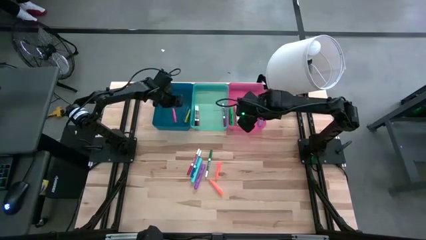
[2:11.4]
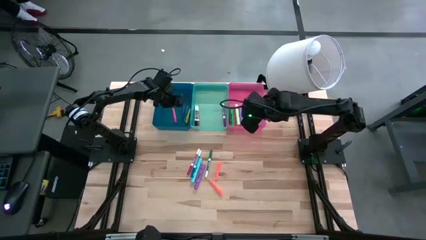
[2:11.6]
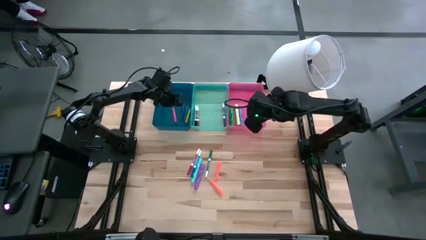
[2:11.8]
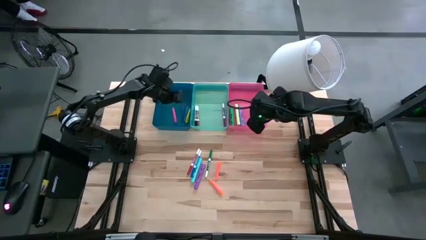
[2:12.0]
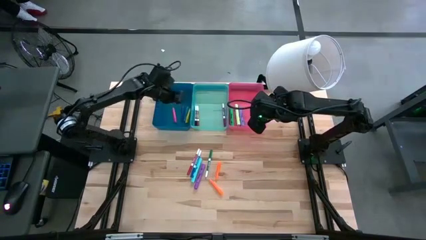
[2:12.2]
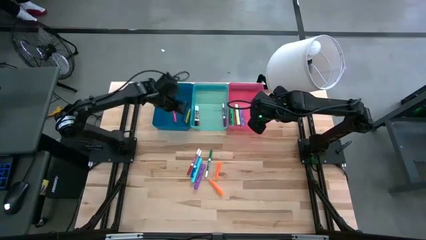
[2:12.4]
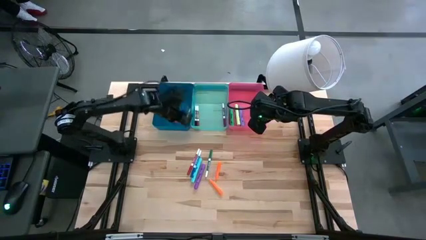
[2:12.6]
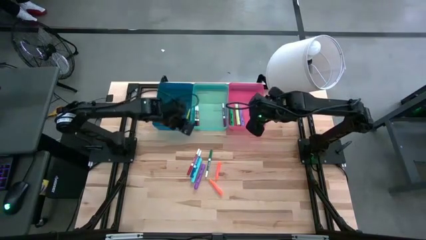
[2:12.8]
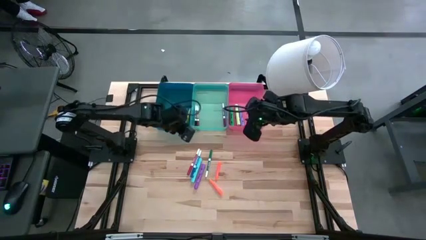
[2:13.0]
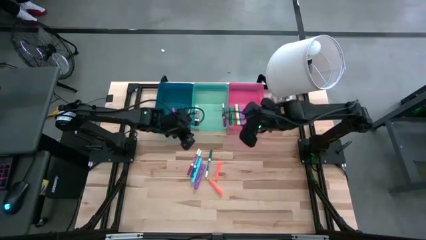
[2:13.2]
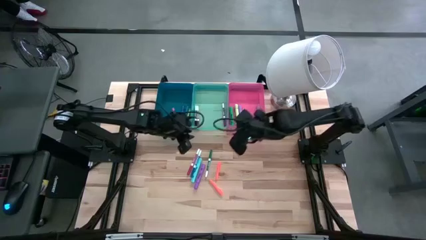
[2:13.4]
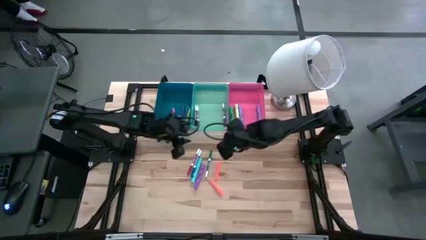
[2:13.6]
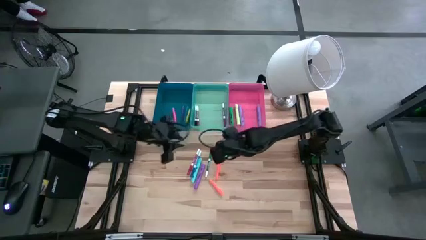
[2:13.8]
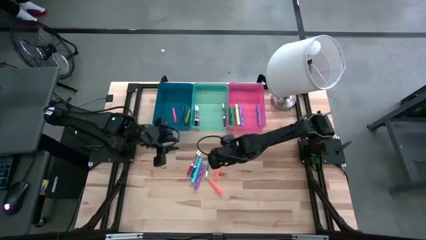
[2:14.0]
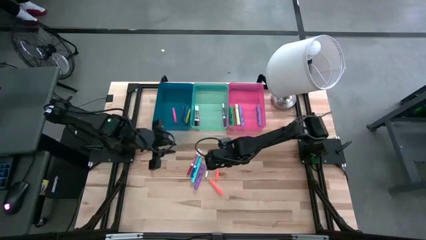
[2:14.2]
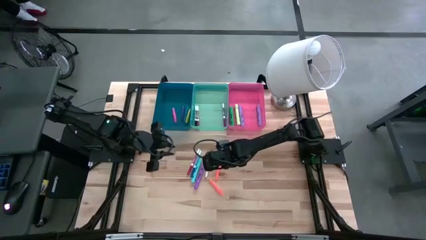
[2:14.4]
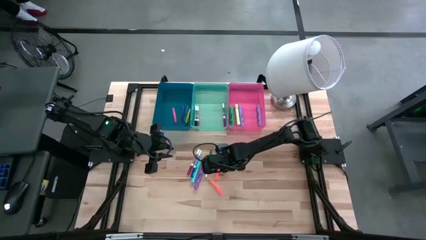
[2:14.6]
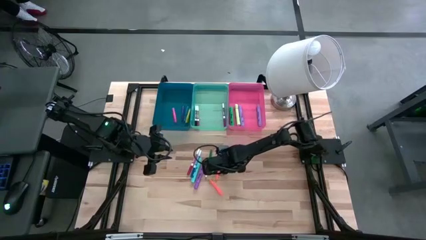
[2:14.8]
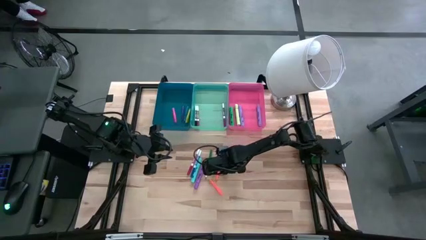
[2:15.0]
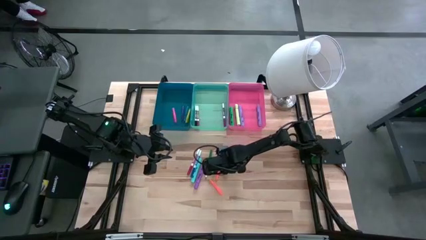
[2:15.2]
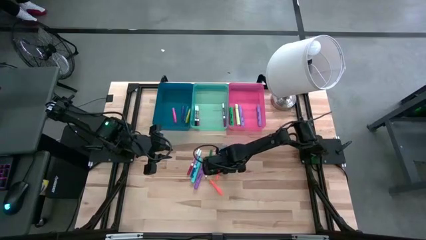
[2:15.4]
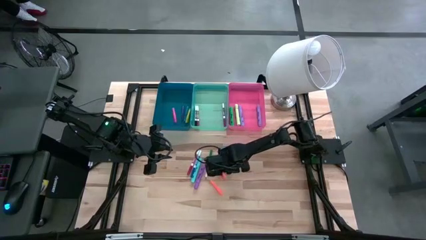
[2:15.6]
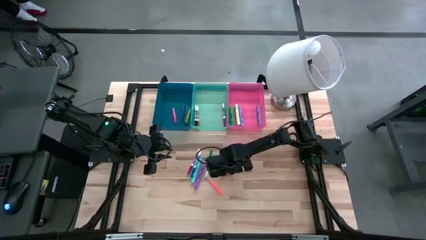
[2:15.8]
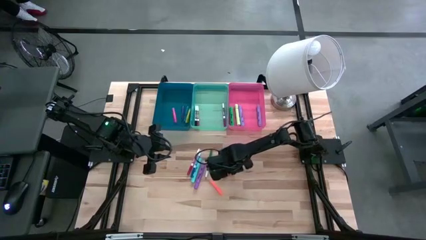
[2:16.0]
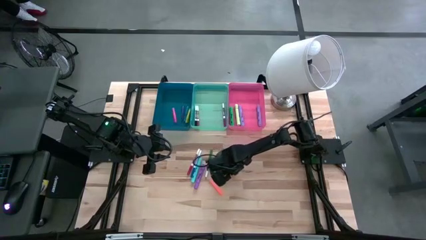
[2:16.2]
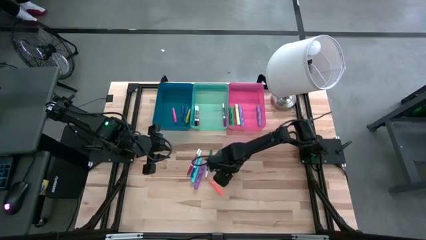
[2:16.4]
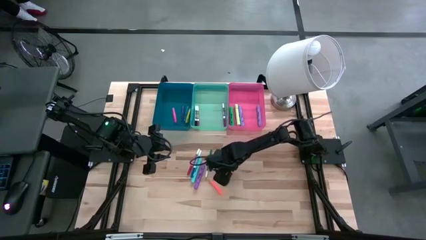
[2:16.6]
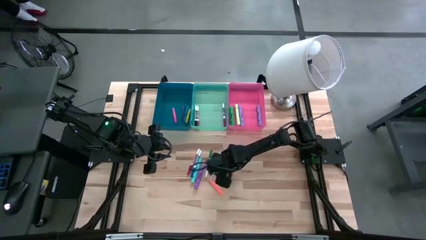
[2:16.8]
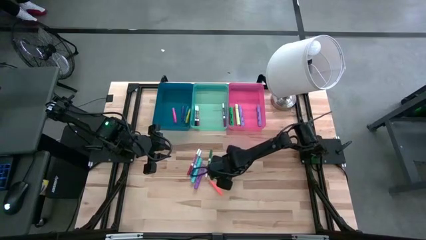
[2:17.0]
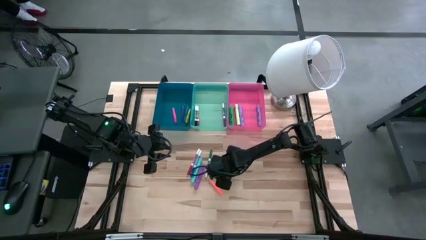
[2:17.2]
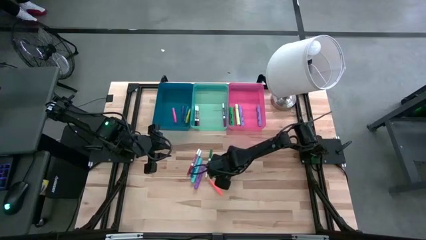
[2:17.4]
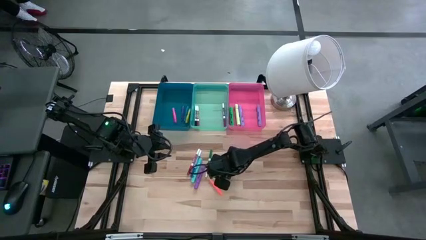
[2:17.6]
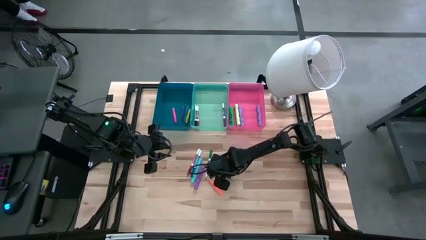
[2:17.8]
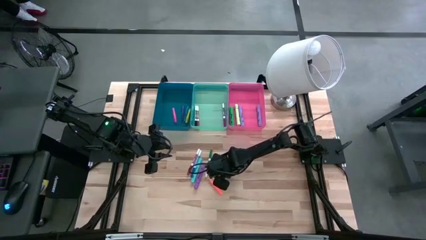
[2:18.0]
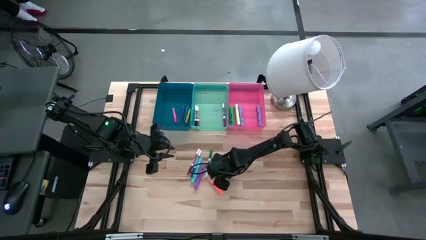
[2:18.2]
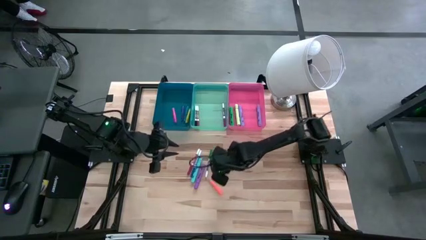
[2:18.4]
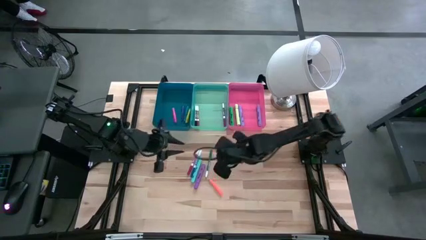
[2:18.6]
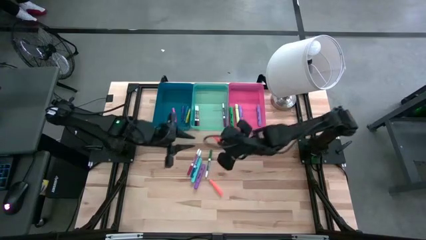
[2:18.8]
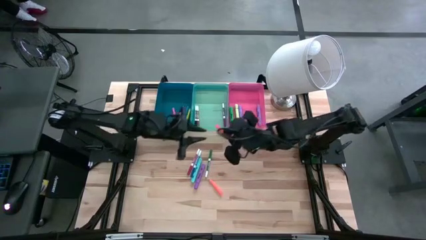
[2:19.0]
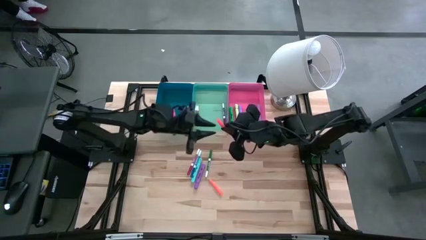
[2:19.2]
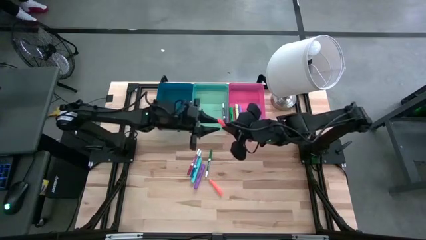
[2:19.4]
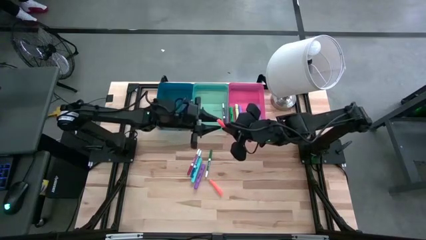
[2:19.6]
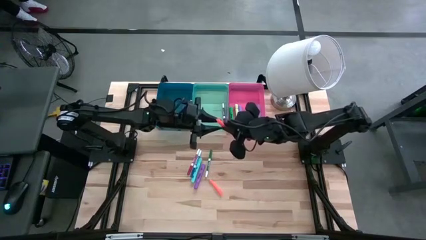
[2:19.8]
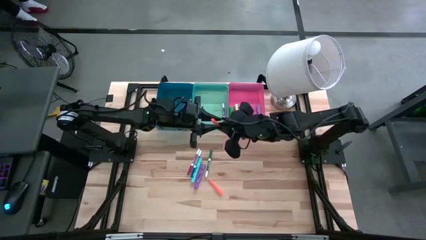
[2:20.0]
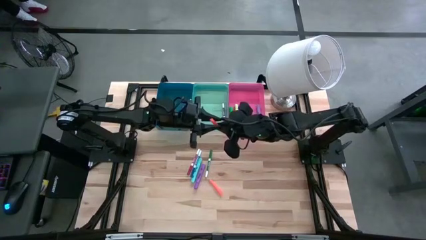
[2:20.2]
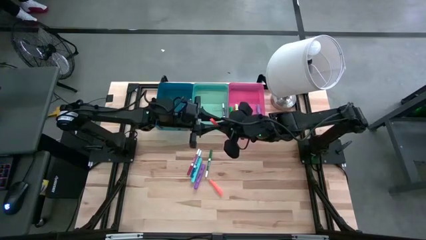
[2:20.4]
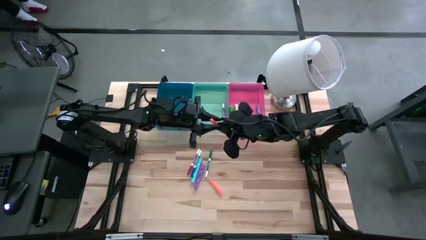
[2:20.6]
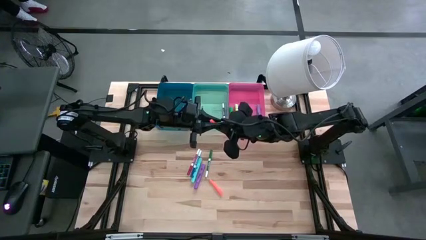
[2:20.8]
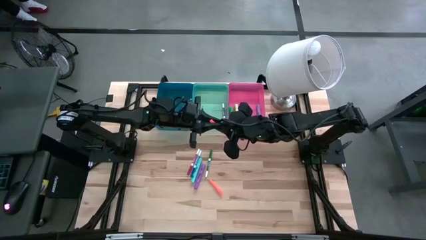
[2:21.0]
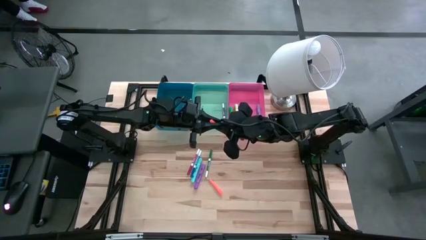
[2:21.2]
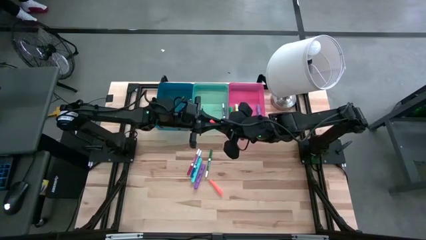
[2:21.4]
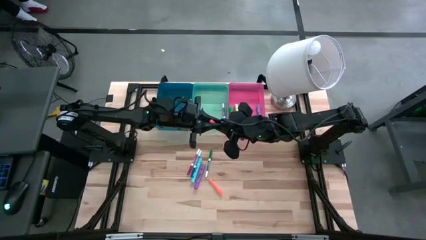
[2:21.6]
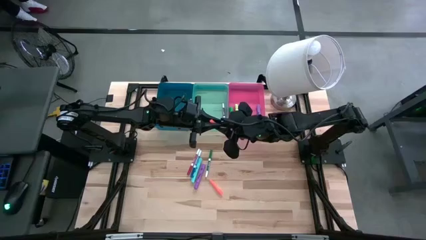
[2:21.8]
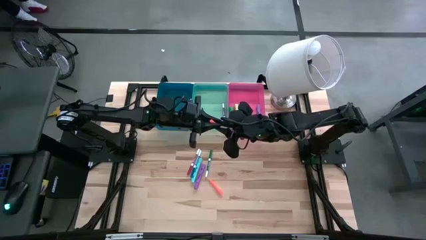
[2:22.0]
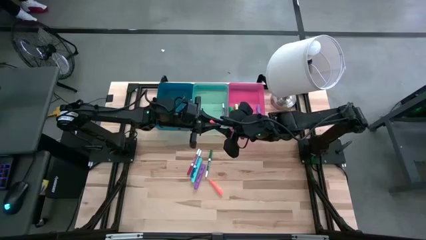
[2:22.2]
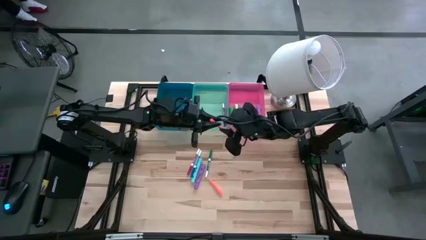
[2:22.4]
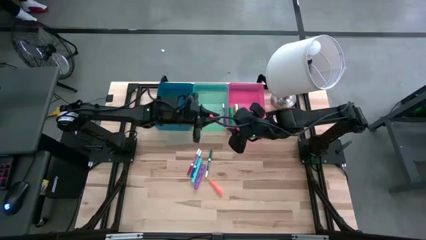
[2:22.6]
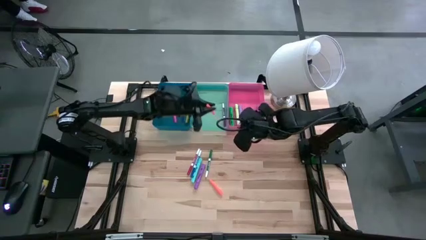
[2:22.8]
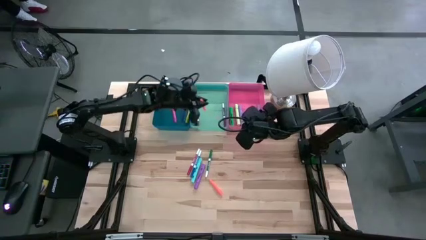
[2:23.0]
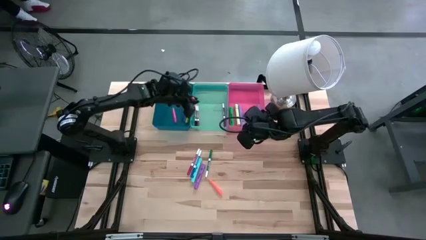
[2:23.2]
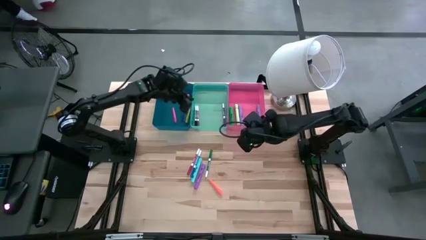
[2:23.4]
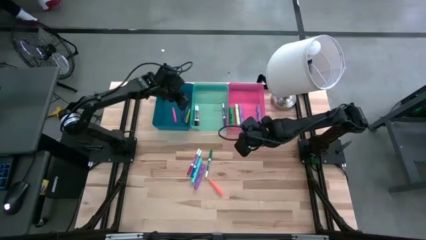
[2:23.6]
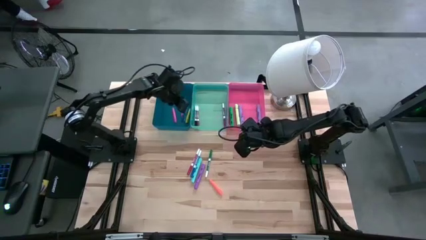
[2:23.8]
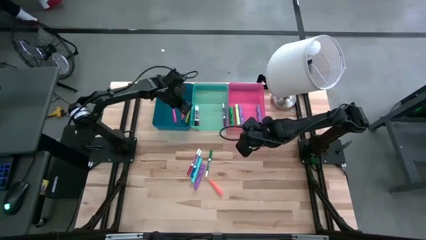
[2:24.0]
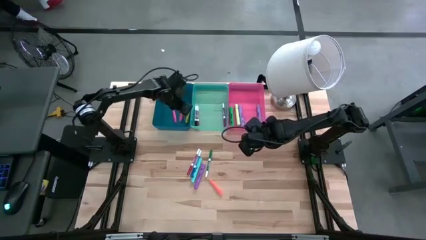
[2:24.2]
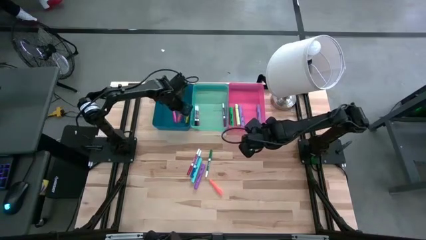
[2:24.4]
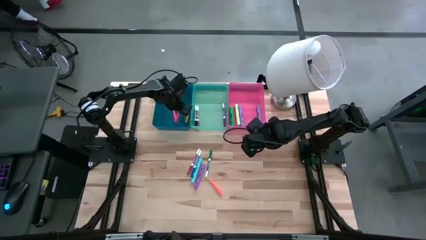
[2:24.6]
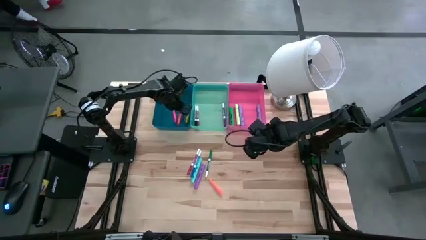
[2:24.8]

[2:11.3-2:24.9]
Task: Pick & Place Markers
Put the top orange pen into the blue bin

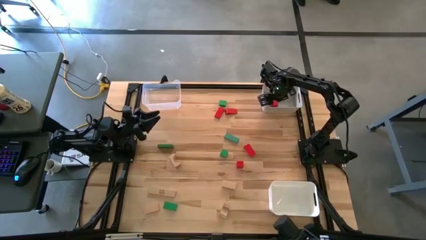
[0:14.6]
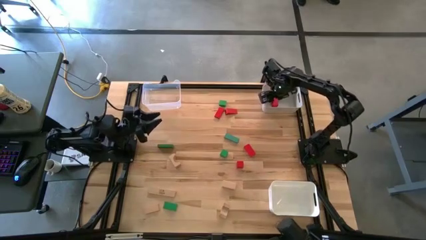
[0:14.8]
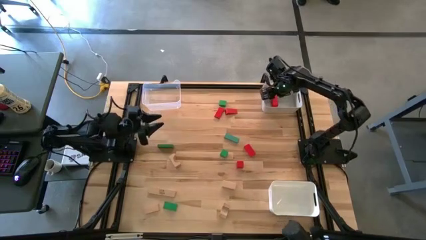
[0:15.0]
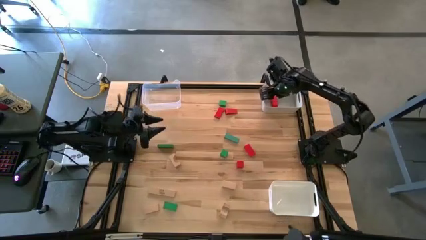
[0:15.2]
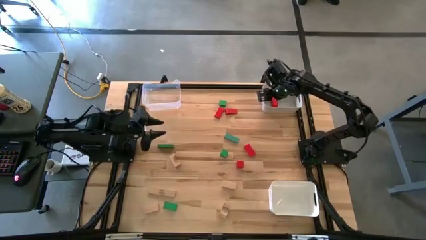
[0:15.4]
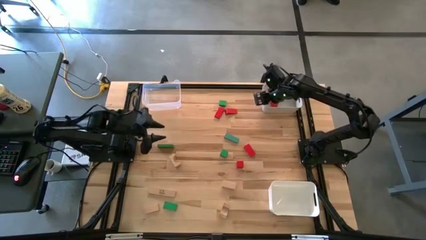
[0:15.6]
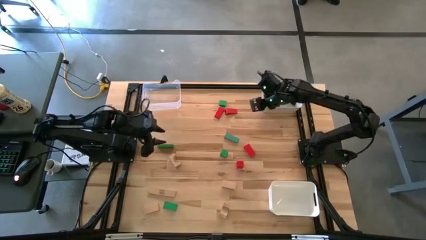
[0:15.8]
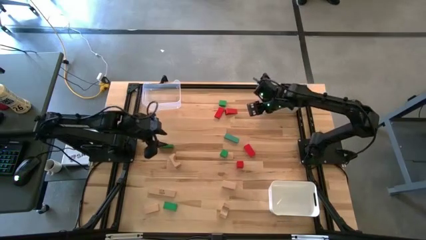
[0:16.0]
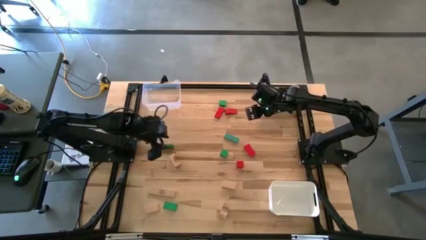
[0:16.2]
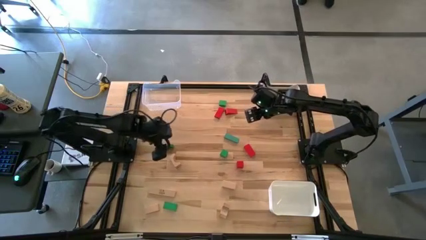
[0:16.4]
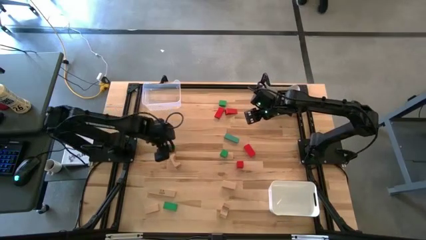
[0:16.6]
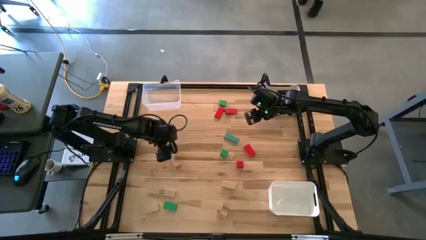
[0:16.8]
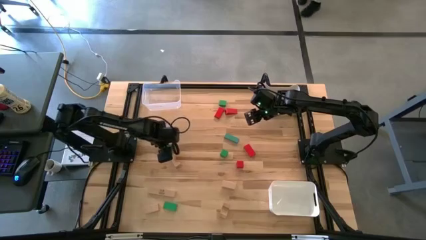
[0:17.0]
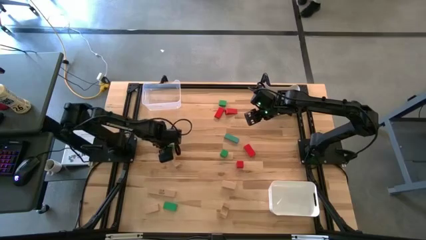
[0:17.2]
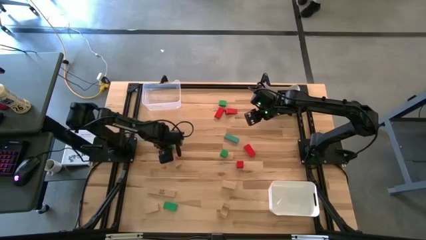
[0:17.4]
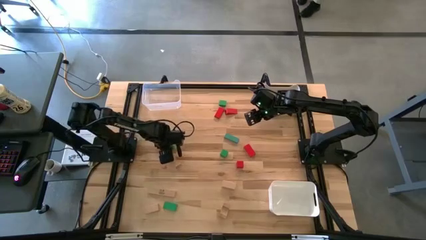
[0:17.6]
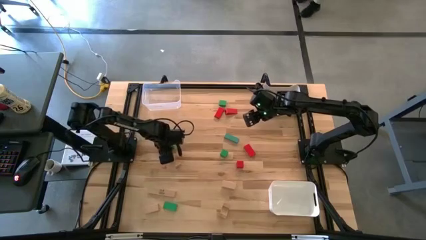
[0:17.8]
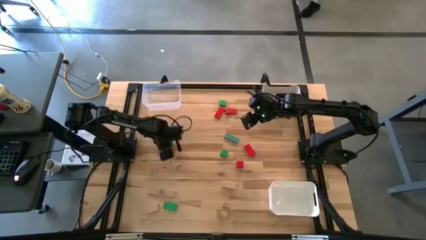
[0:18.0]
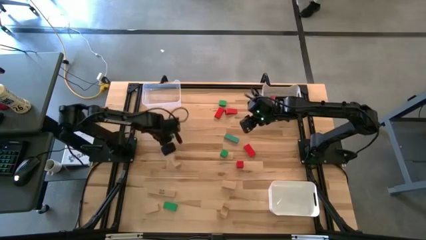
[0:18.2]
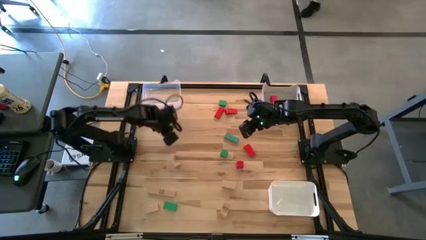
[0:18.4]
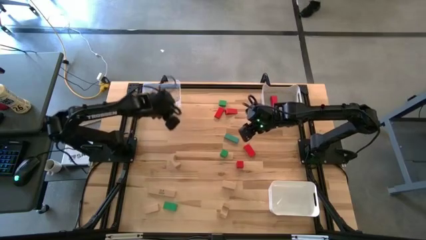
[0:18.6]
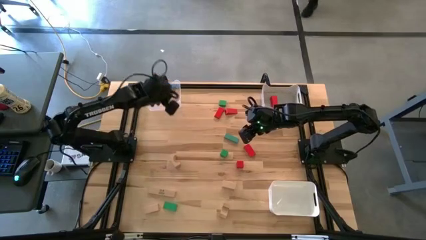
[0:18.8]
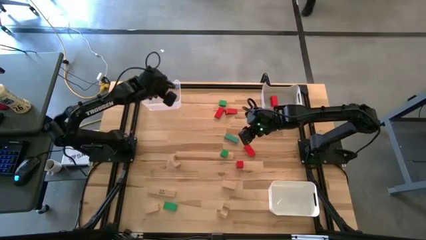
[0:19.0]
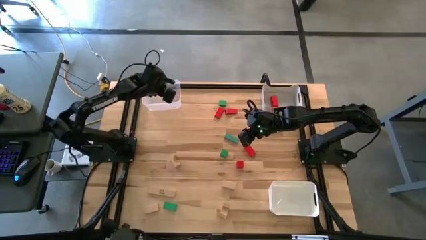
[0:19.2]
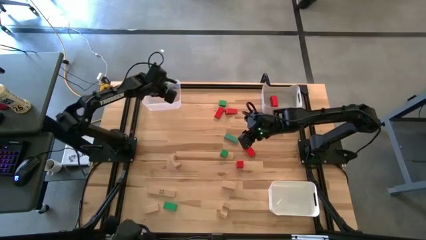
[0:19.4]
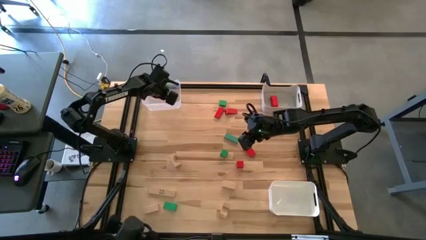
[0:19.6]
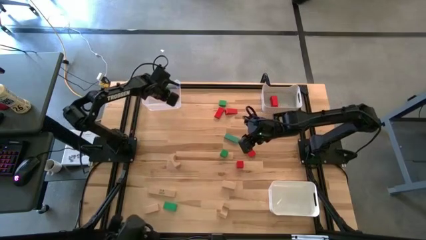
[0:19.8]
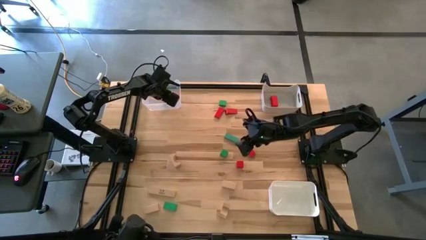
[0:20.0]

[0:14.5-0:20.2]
Task: Sort & place blocks by color
Put the green block into the transparent bin
